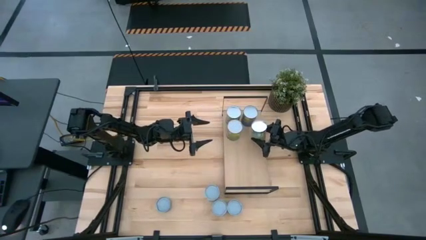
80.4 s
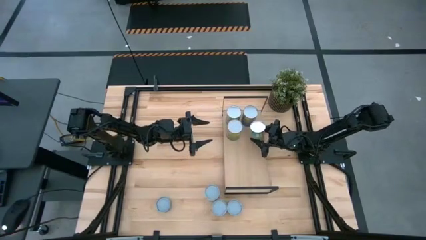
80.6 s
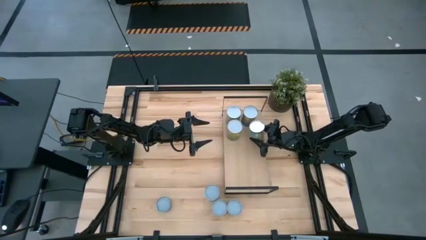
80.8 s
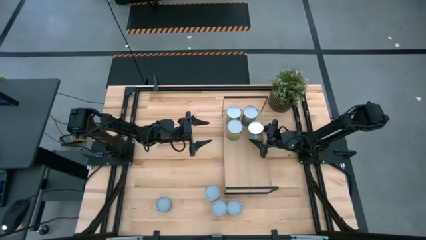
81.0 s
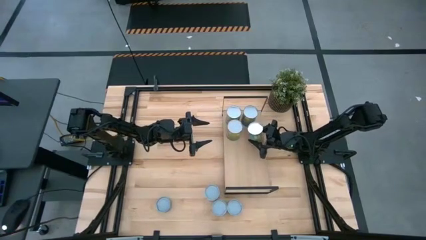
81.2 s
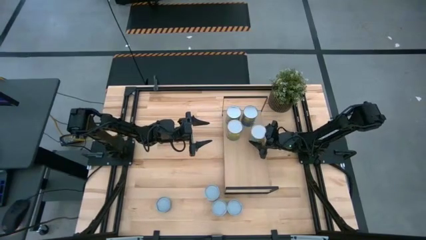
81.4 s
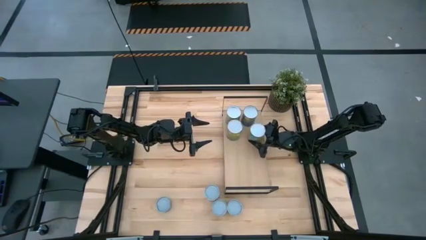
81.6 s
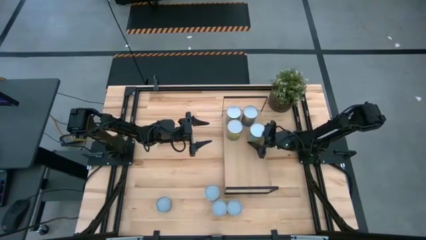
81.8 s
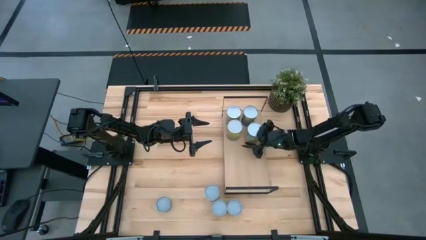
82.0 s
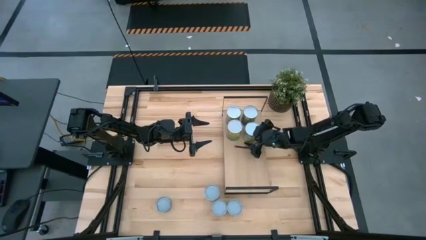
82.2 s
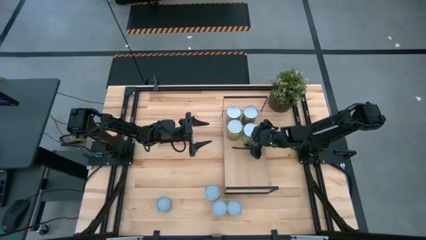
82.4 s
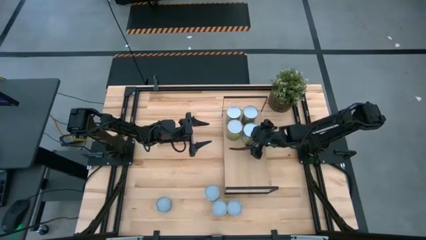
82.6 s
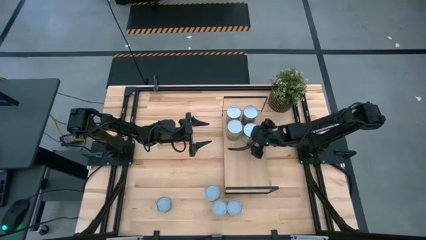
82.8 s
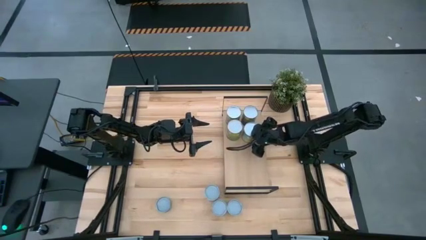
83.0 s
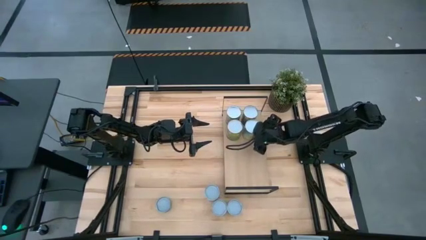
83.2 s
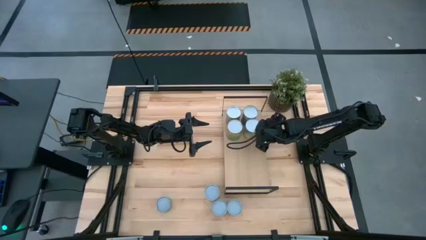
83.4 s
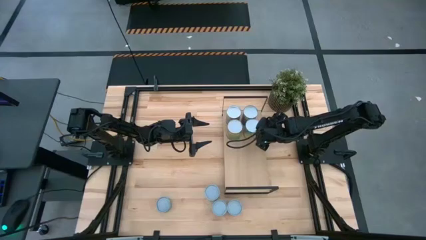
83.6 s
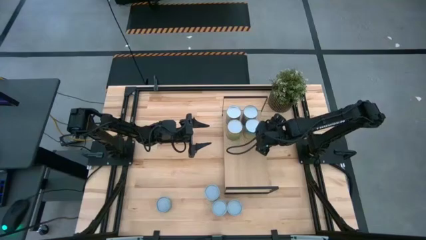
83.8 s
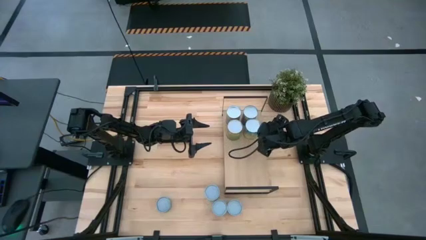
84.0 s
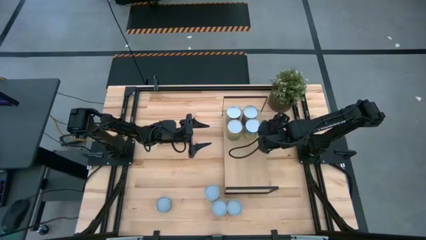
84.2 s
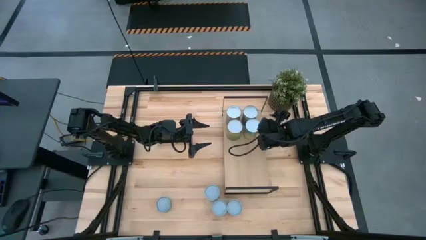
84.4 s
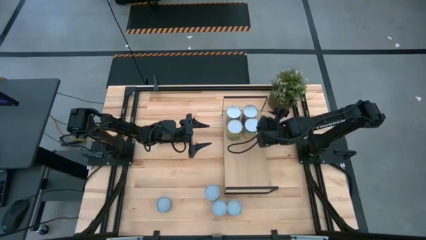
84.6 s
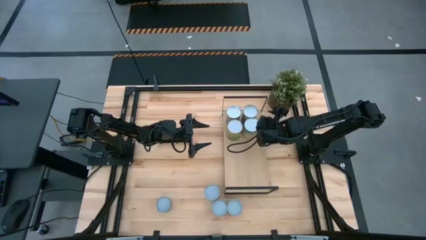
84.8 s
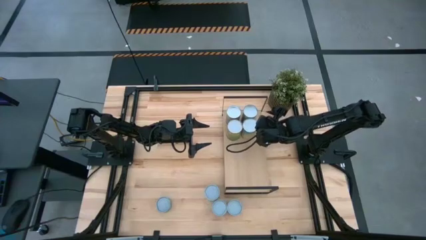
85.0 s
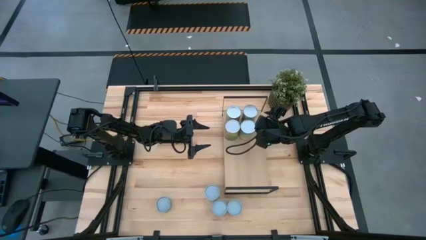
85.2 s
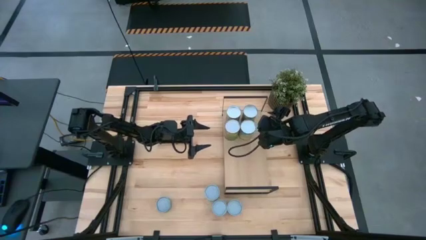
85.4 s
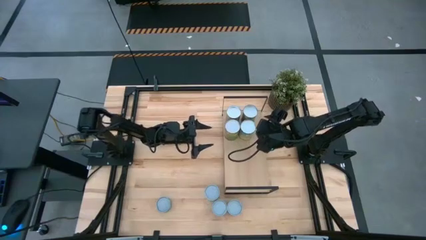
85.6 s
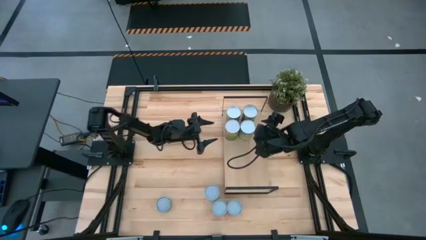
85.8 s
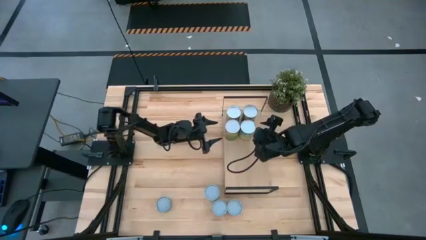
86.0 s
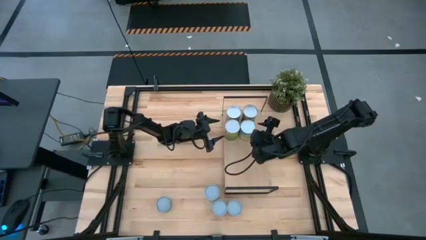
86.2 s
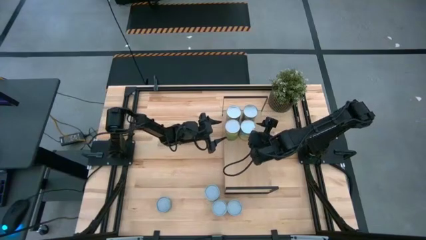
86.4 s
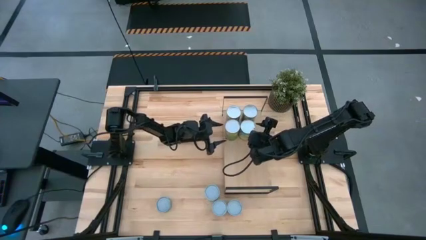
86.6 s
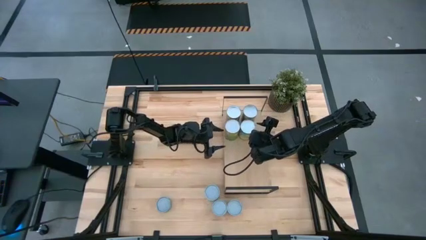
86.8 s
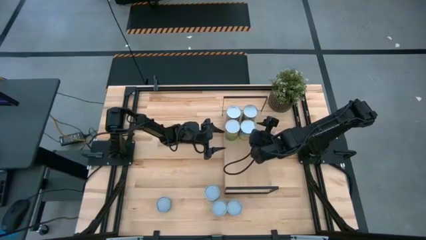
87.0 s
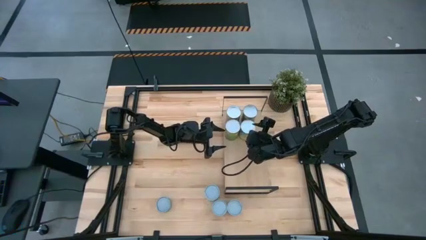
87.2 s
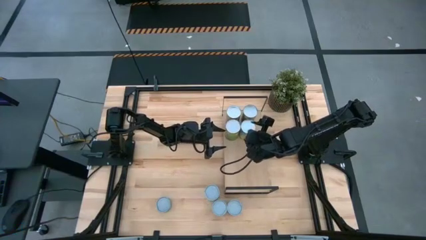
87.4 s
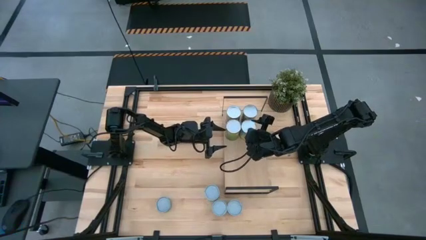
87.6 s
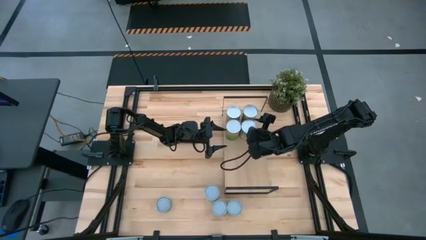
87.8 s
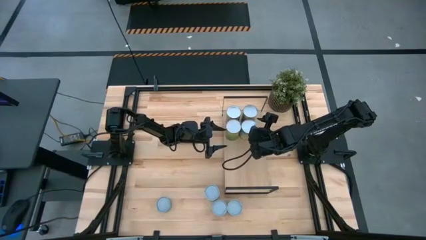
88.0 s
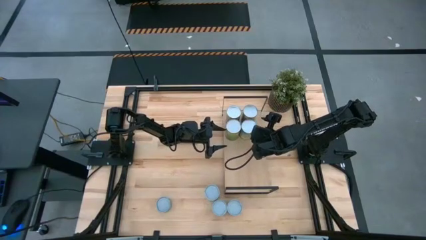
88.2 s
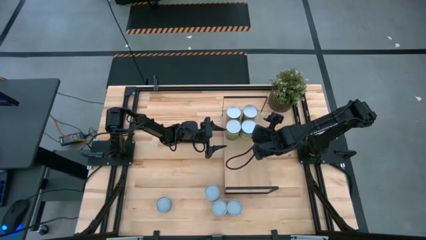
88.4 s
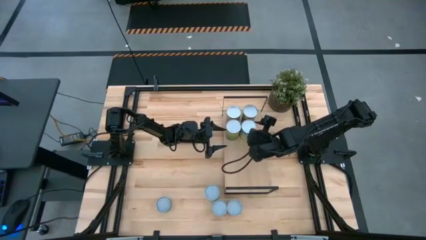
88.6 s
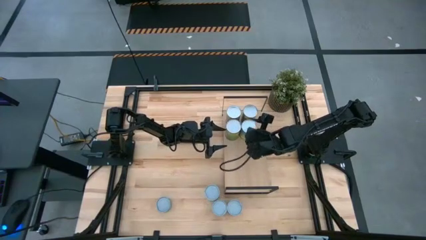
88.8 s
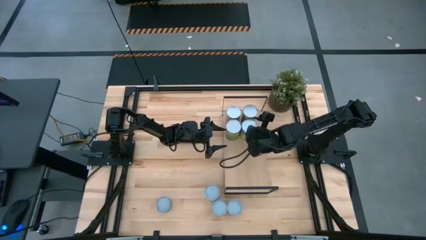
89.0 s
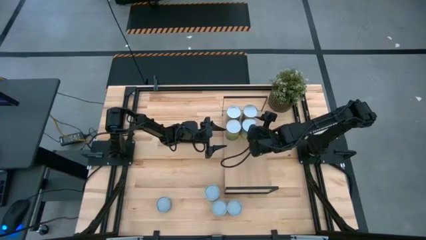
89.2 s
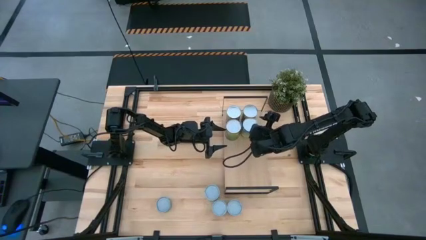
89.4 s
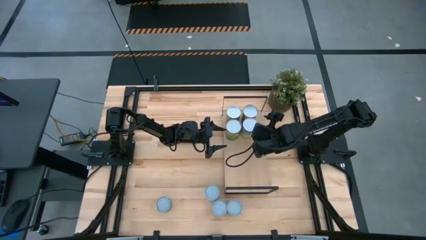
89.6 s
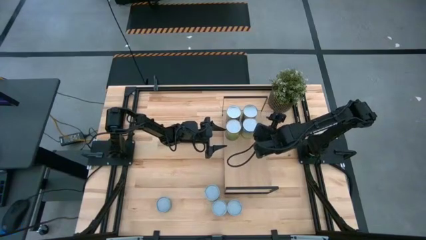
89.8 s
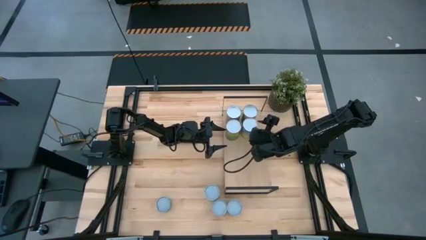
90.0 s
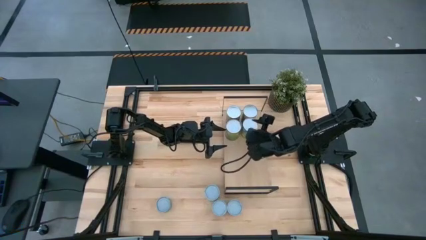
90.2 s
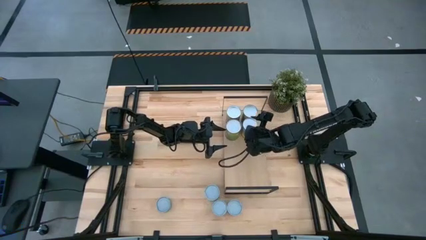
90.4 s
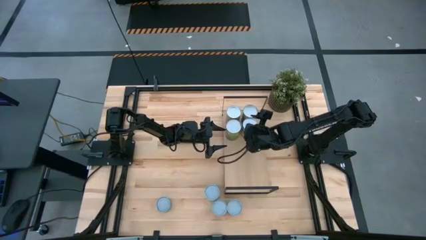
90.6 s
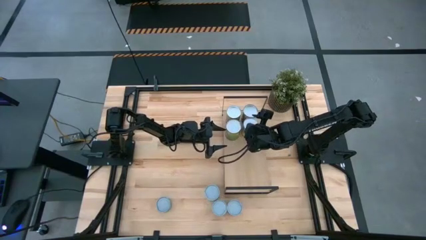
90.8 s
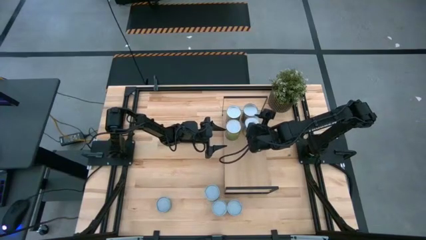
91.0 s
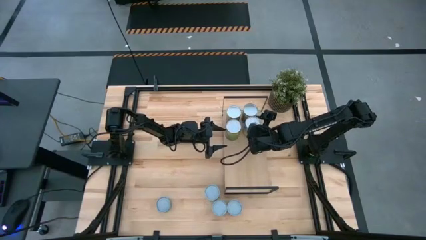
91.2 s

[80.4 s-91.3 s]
Task: Pick and place cans onto a shelf
Put the canned carrots on the shelf
